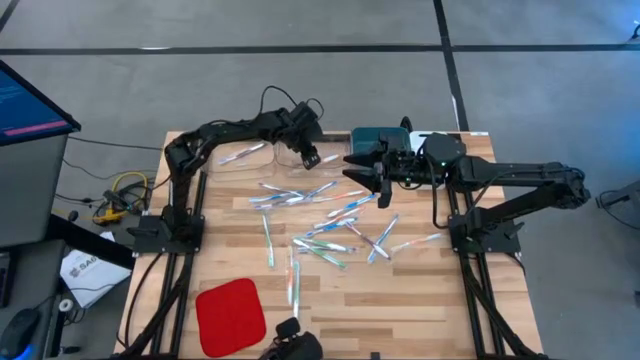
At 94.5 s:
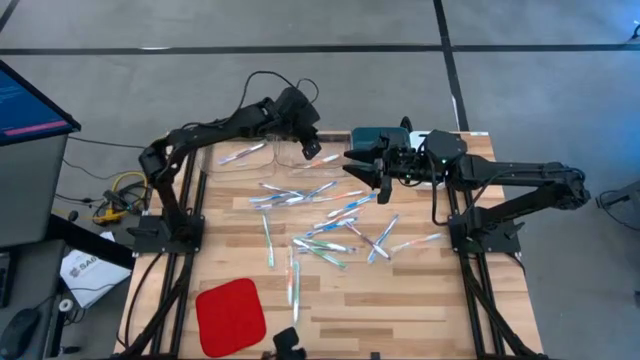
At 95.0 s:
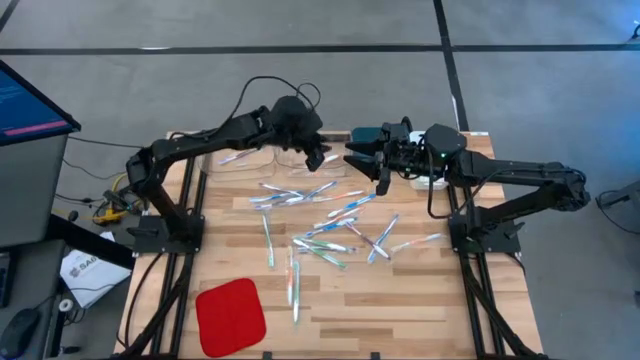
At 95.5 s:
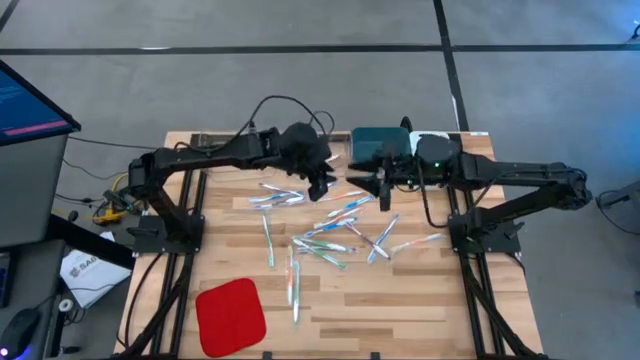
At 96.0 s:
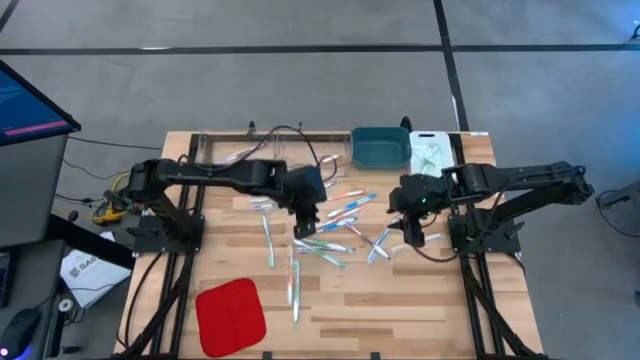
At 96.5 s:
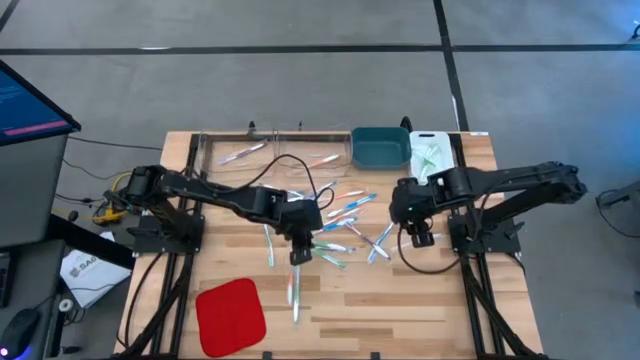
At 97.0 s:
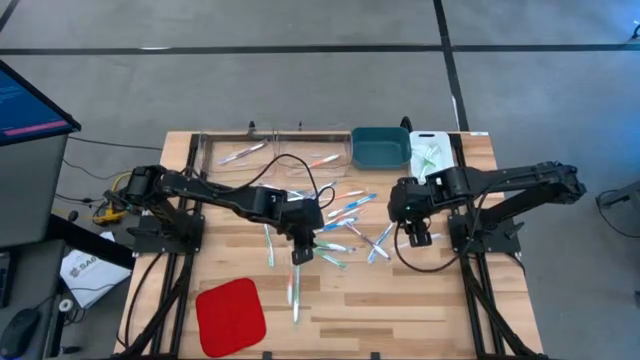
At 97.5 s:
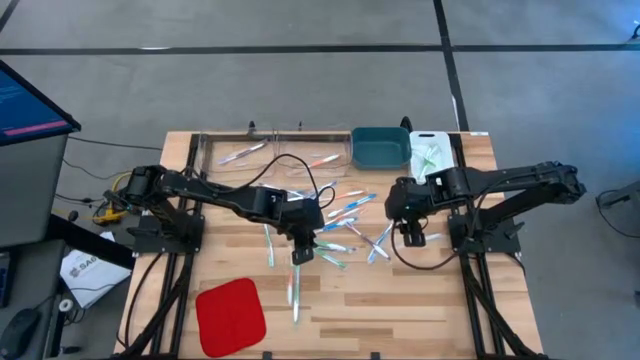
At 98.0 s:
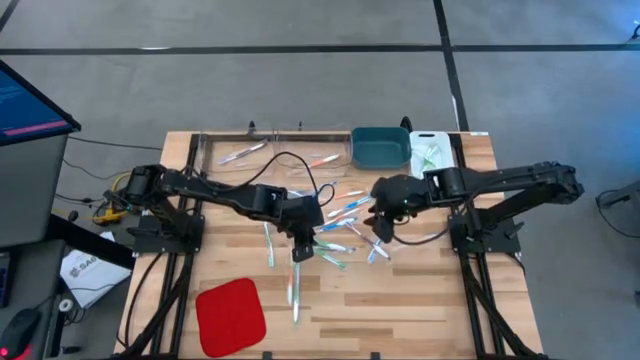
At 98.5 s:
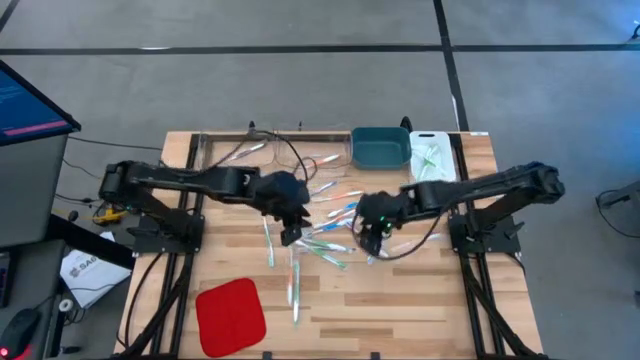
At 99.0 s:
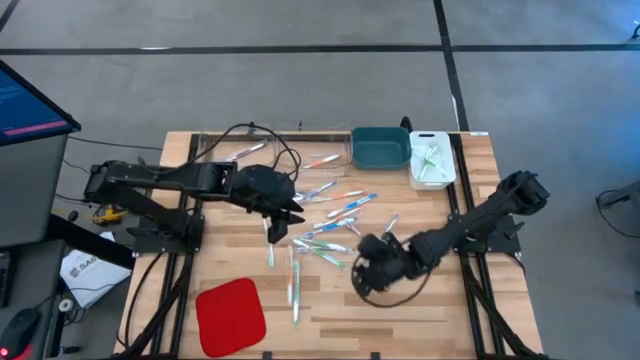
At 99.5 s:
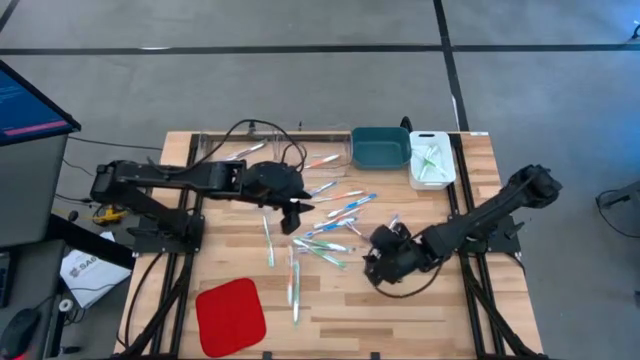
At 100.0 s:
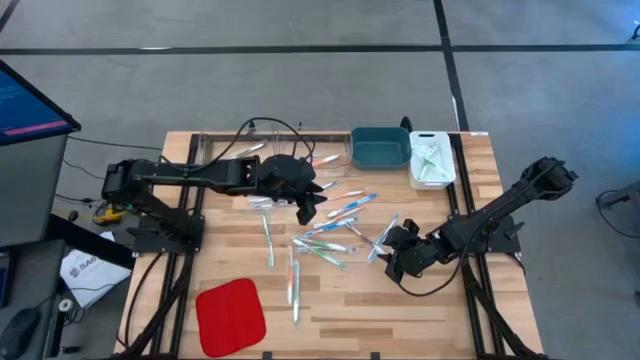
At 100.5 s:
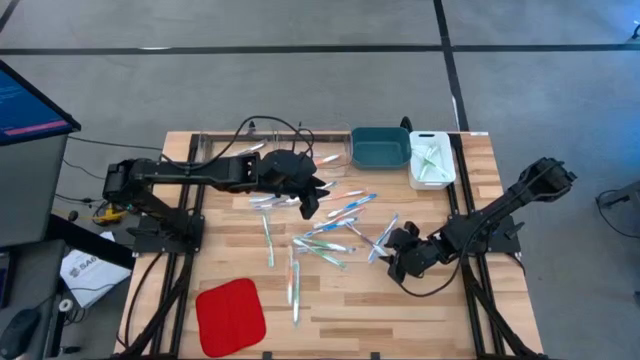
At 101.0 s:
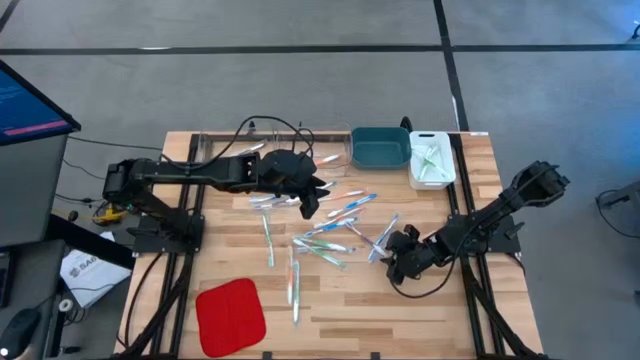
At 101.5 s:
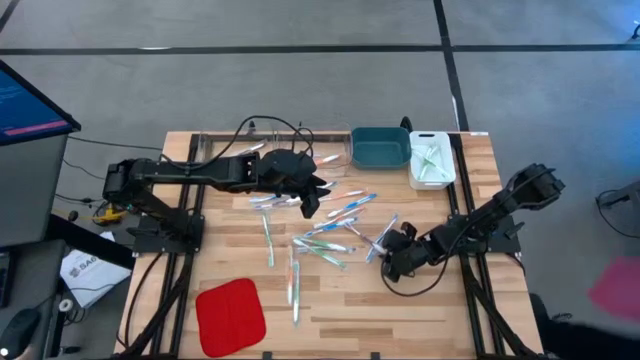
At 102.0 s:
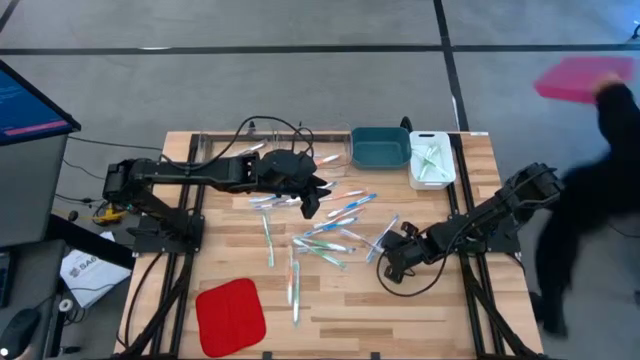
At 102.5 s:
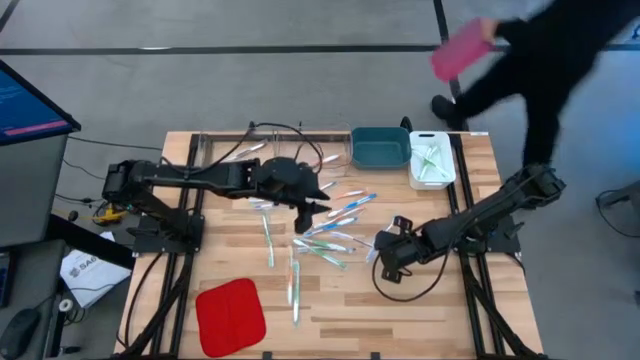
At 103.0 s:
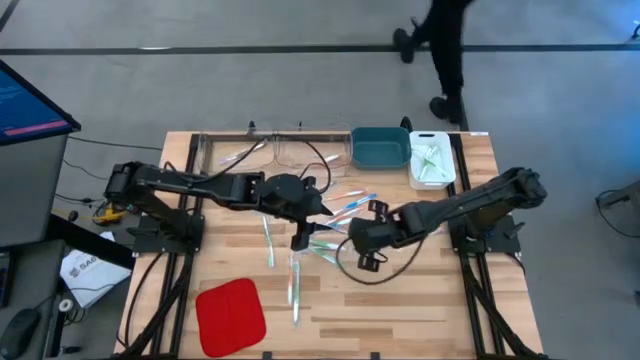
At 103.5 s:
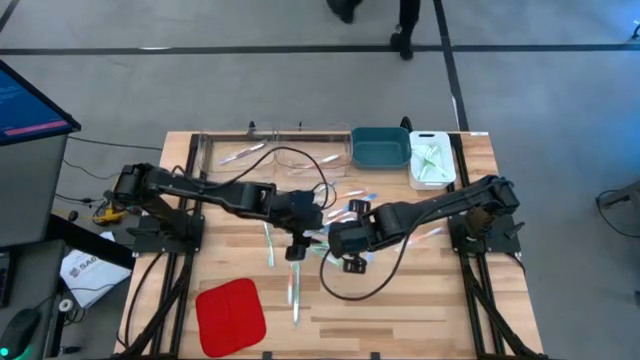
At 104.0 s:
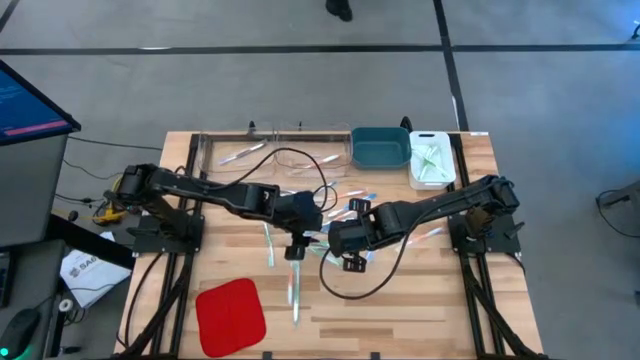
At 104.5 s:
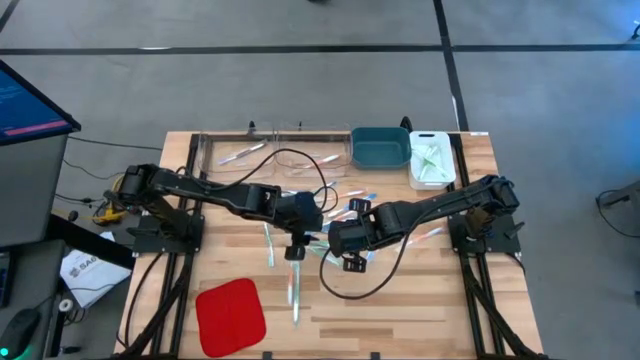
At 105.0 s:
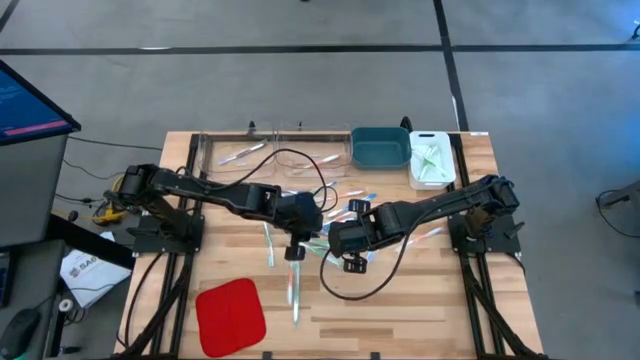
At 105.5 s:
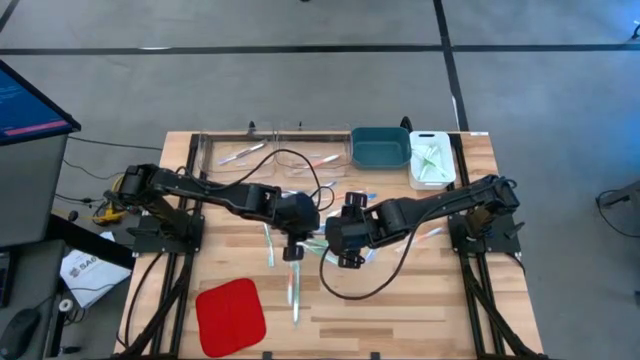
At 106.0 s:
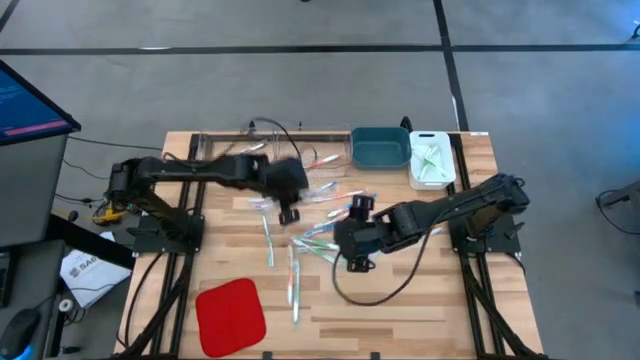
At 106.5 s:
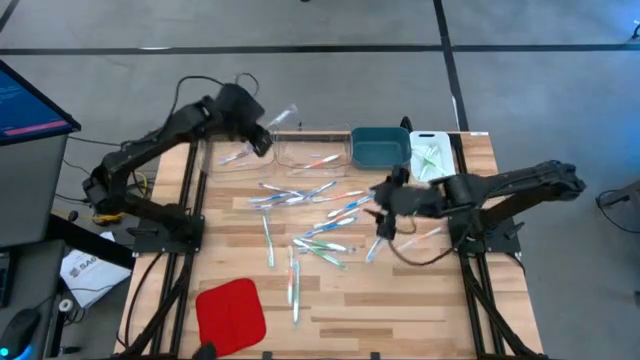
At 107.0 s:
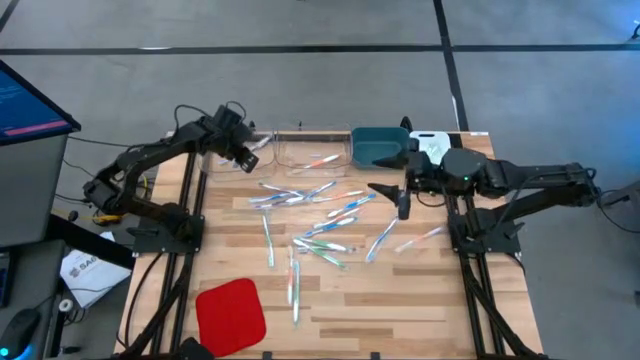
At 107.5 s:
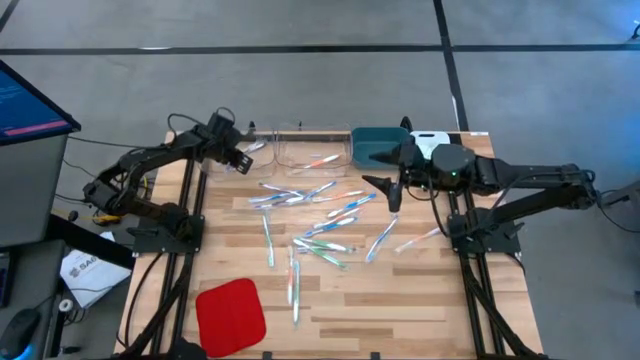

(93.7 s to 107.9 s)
Task: Pick & Place Toothbrushes
Put the violet toothbrush into the left transparent bin
